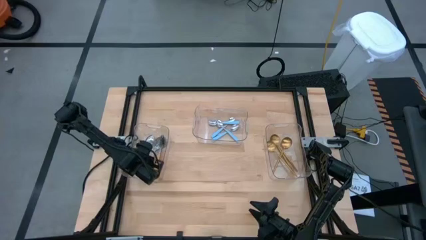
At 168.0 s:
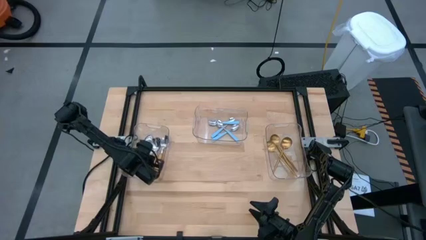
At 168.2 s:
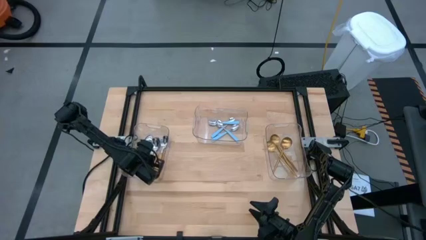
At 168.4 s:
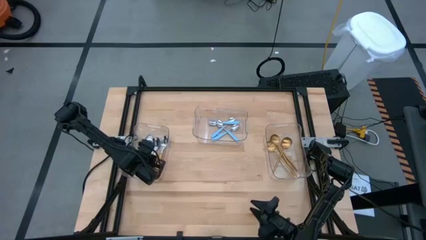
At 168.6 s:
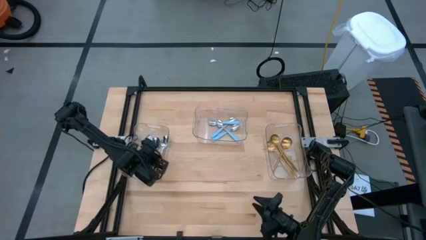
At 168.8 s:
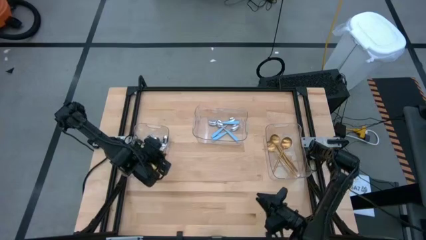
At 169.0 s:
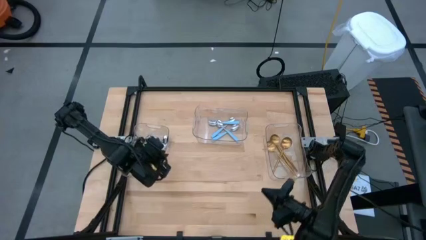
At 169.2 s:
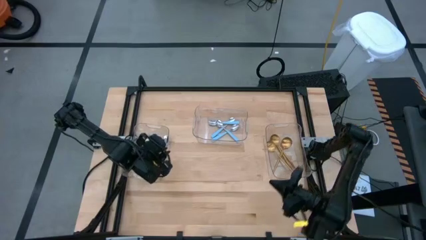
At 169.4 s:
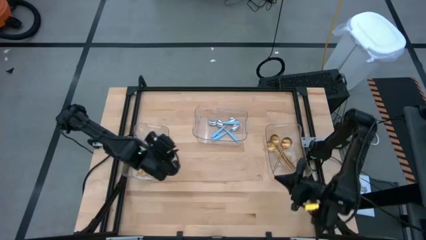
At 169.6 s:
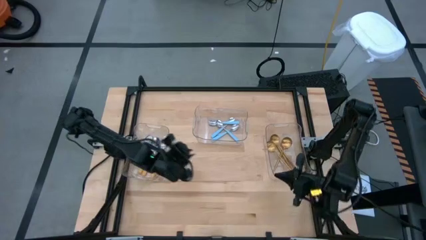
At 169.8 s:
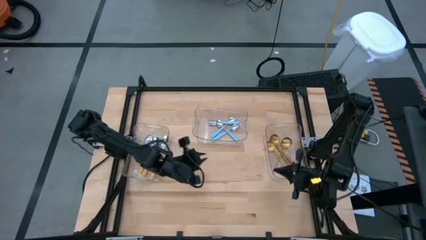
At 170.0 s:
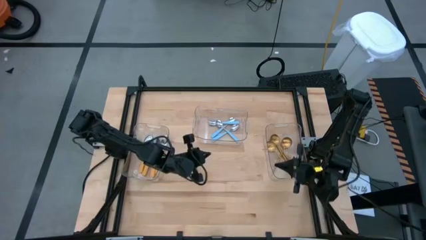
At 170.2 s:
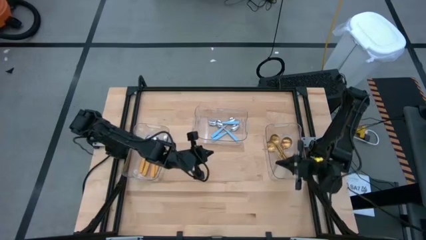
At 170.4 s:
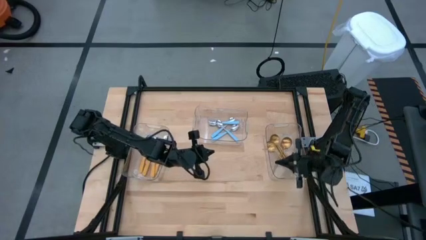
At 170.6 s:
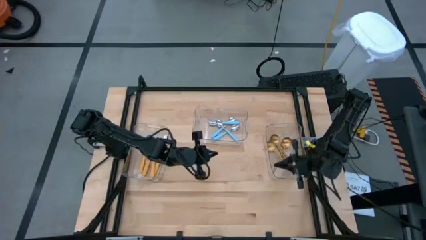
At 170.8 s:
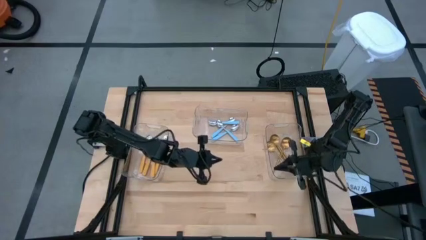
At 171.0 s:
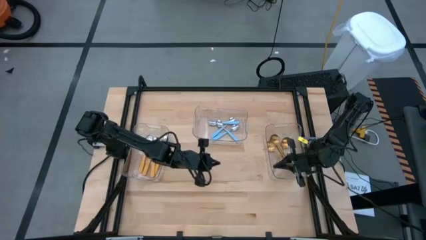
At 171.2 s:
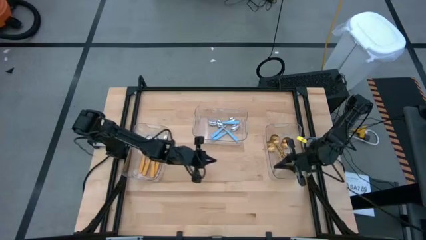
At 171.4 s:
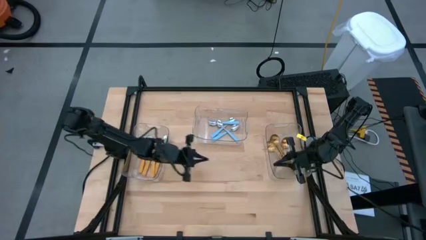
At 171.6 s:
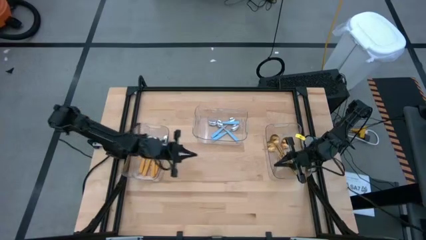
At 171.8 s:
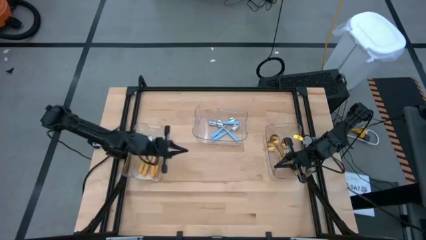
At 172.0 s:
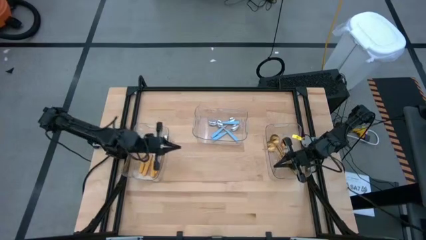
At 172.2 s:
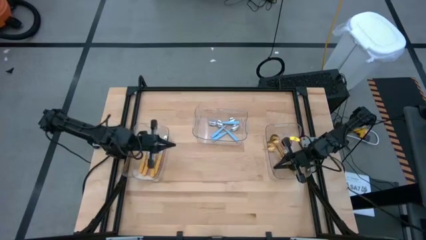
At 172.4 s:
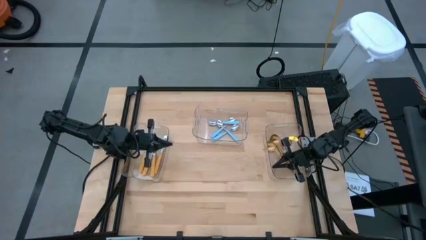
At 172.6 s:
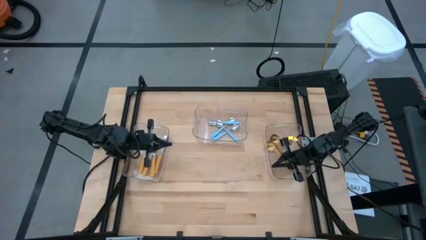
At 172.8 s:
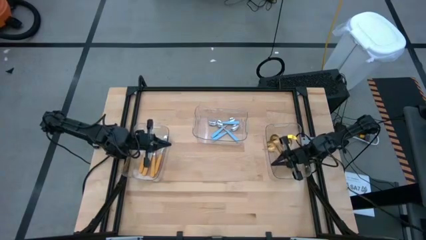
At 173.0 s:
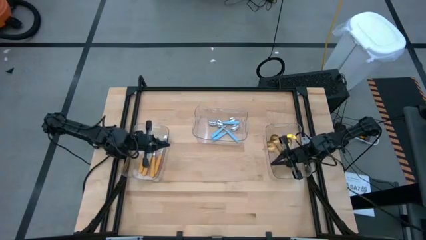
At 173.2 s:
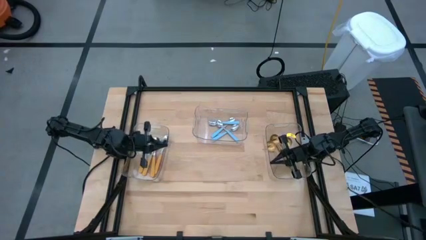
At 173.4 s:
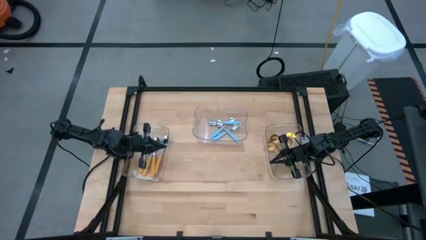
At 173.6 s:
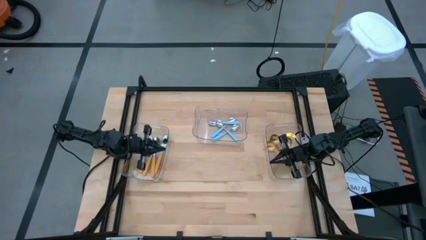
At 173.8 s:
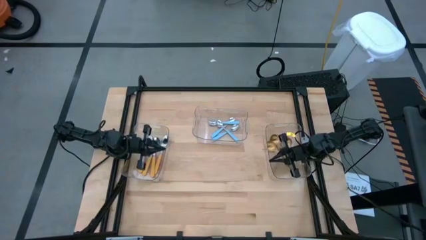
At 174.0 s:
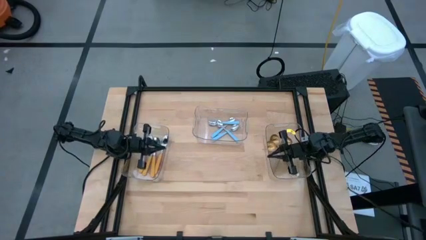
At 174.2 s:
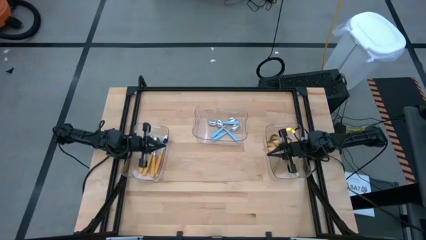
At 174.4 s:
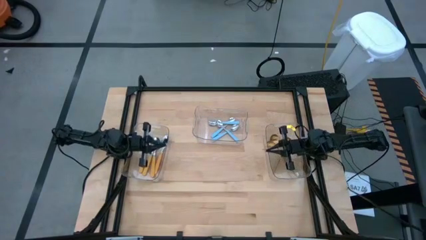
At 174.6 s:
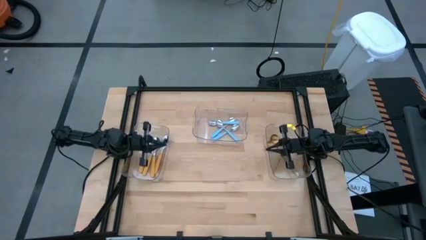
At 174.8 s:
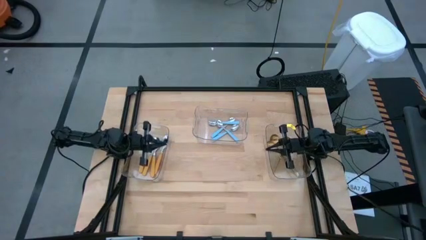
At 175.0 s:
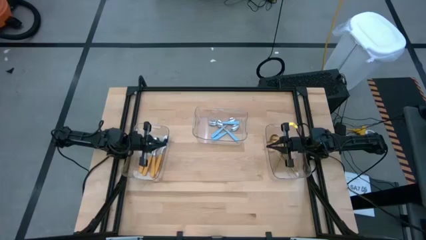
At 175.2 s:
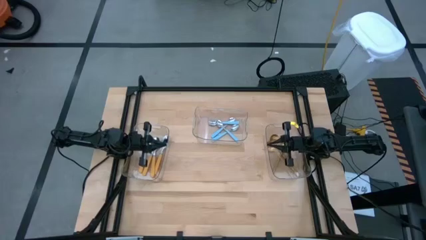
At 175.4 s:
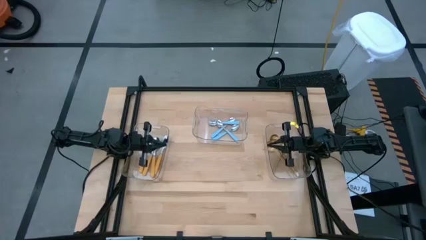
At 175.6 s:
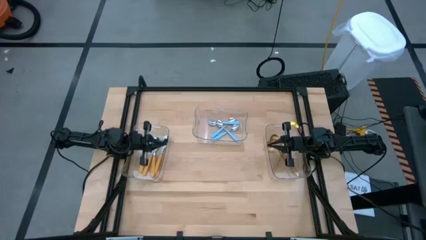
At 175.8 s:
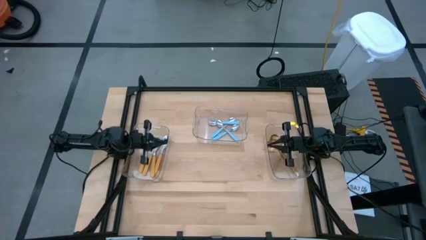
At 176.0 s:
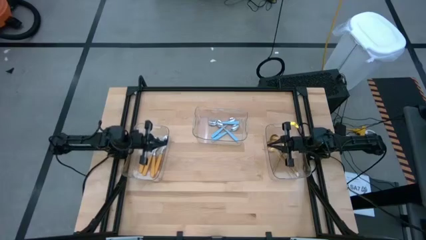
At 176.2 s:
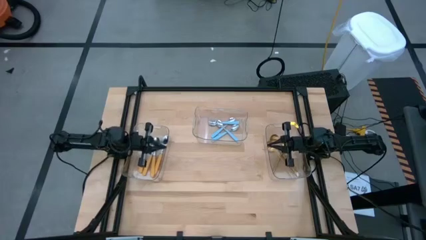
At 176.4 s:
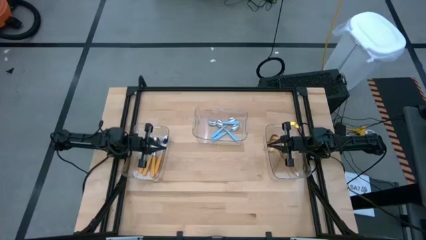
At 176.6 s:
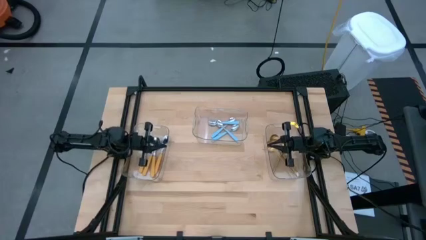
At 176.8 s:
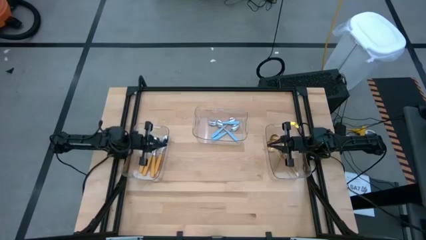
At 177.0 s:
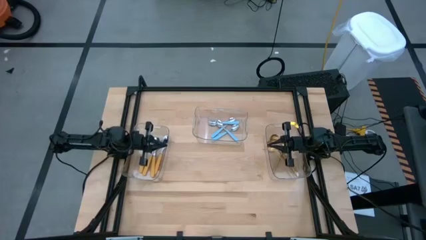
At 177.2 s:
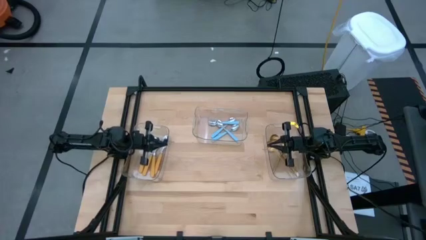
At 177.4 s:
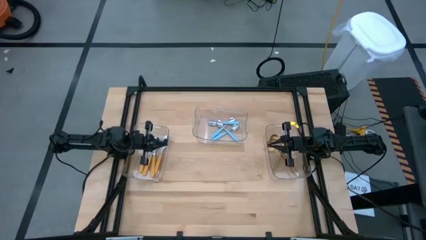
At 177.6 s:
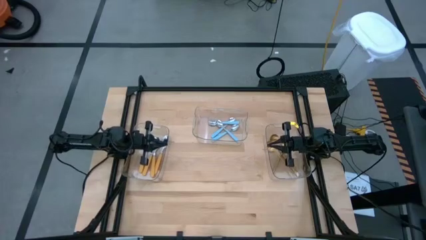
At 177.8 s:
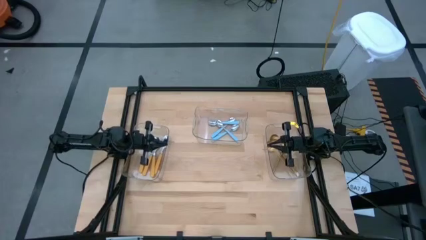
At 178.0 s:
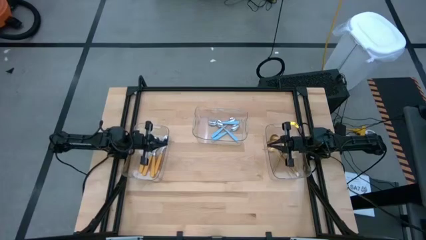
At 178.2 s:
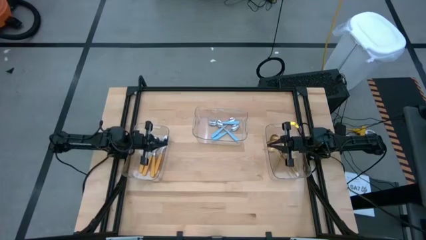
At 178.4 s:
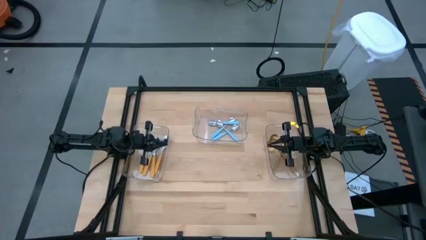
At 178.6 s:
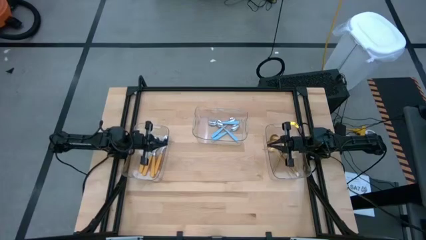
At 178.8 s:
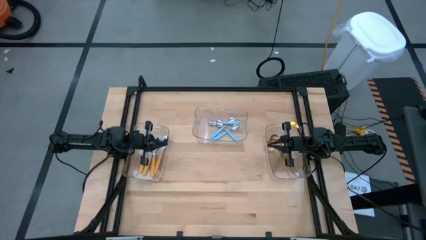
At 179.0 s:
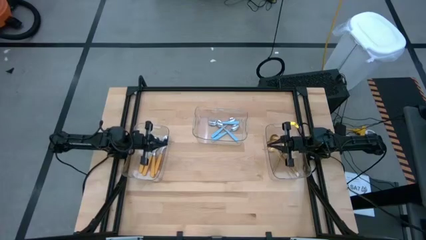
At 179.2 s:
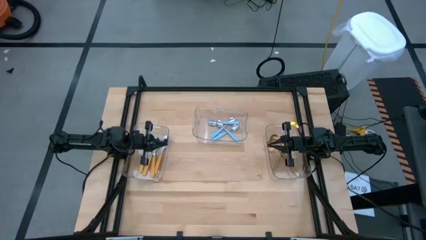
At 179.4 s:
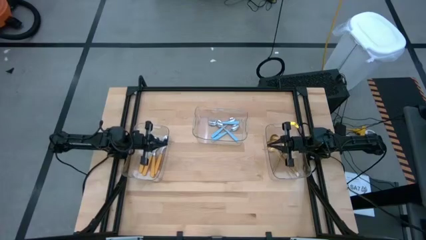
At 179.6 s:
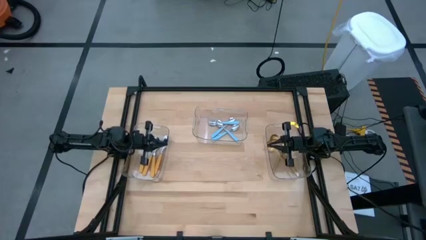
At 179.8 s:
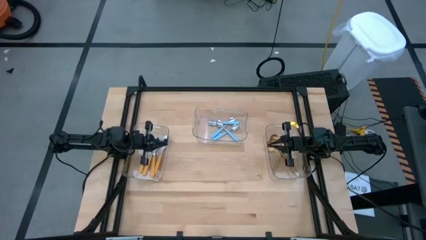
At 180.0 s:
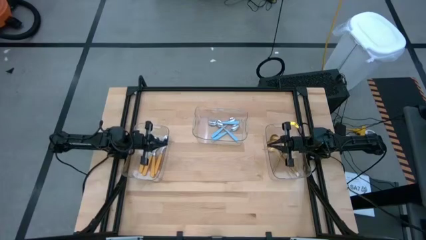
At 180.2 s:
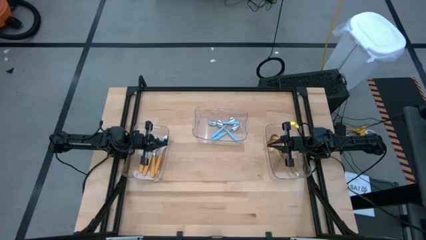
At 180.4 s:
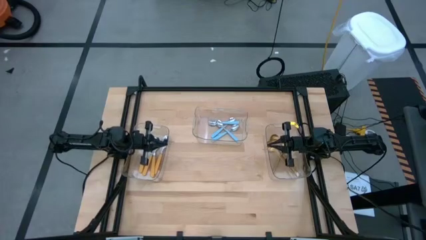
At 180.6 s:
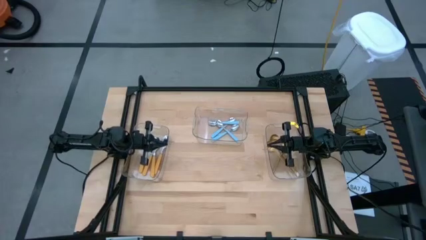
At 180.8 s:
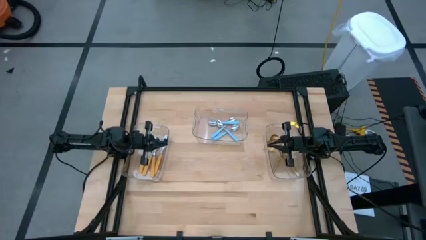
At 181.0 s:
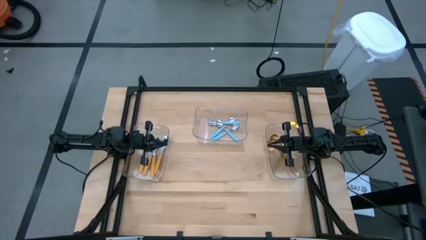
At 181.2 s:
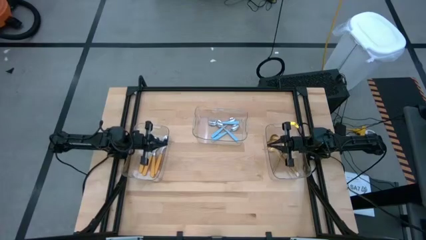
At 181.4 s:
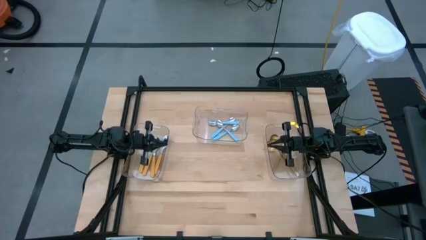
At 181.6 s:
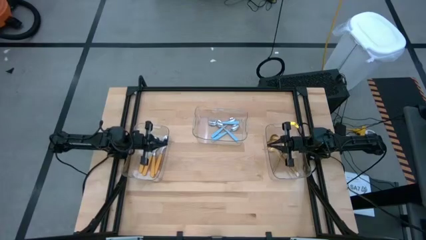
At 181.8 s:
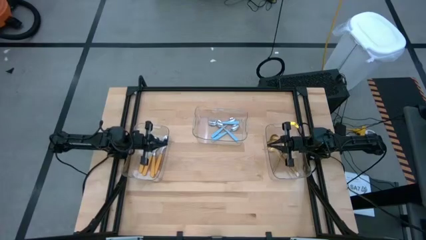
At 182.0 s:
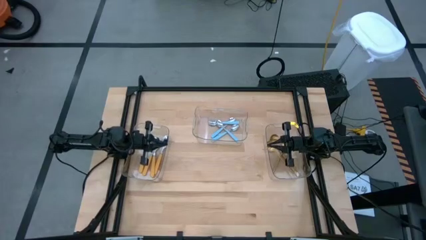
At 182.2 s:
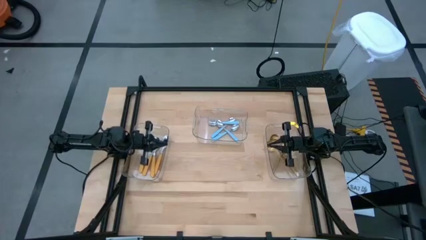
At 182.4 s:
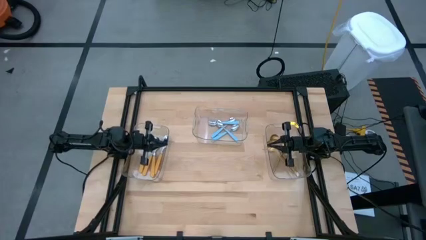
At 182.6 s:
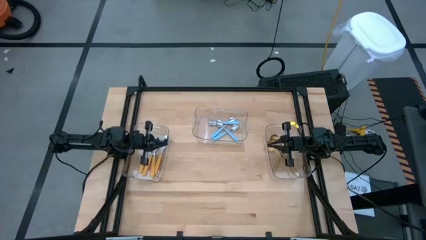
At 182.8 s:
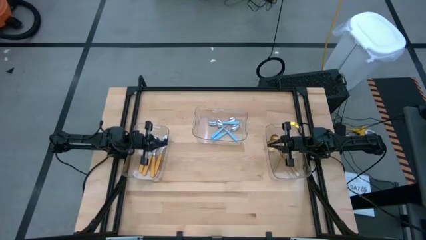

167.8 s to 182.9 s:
Task: Sort silverware by color (type)
Return to Home Position
